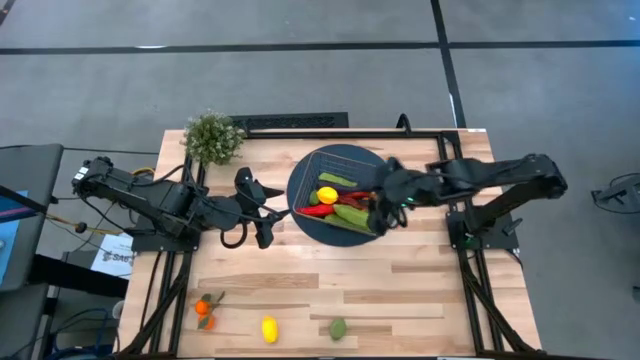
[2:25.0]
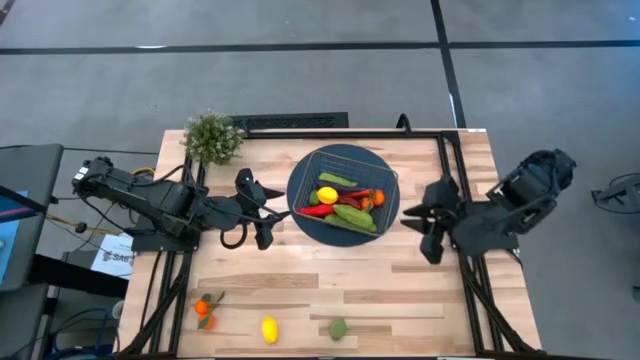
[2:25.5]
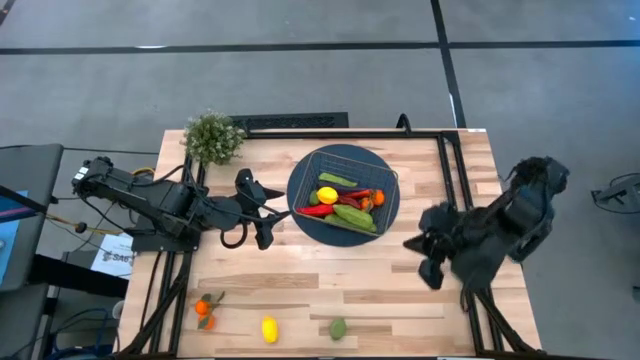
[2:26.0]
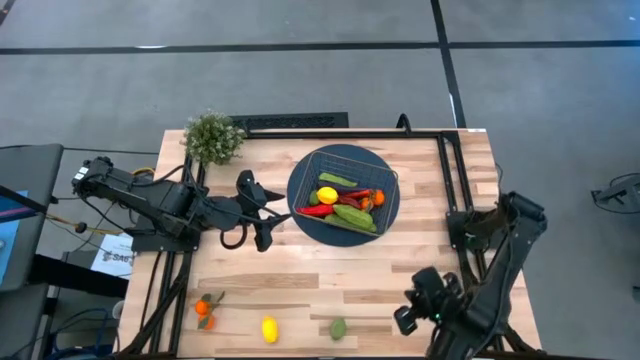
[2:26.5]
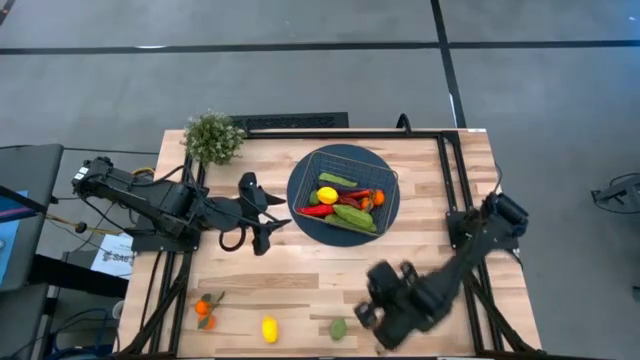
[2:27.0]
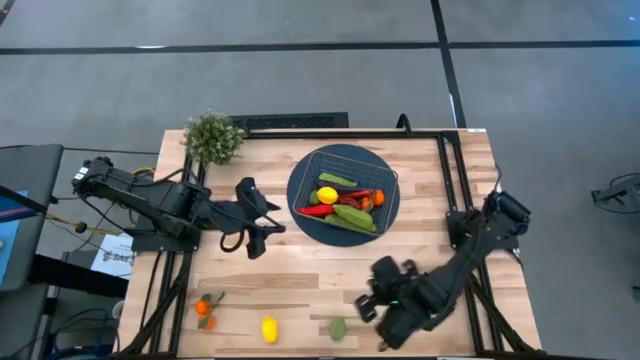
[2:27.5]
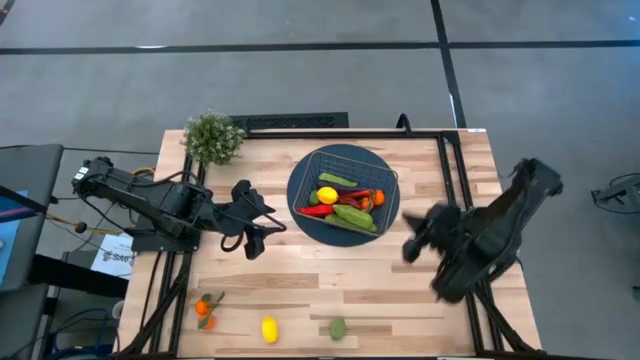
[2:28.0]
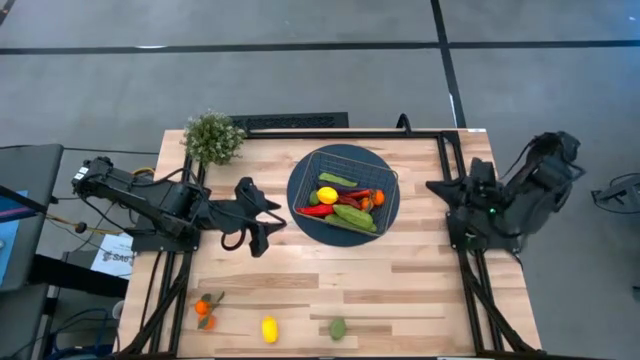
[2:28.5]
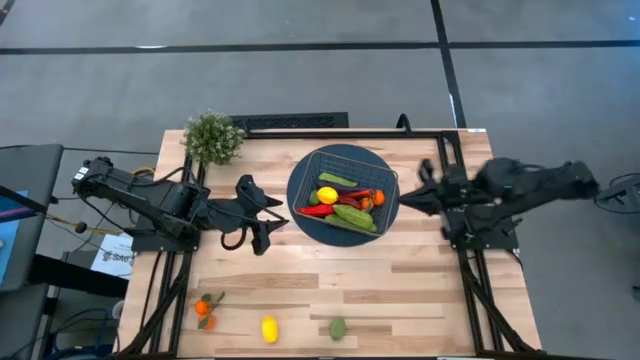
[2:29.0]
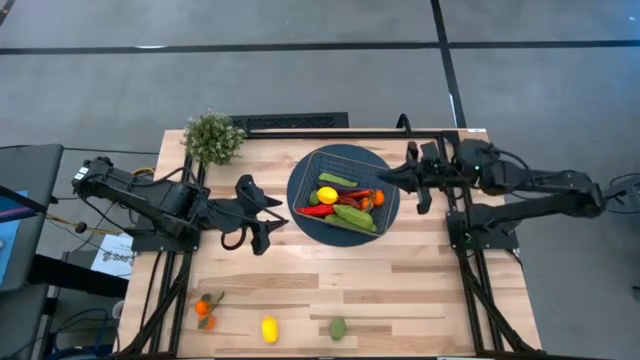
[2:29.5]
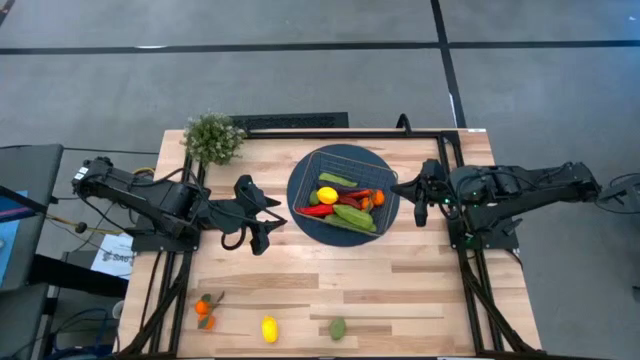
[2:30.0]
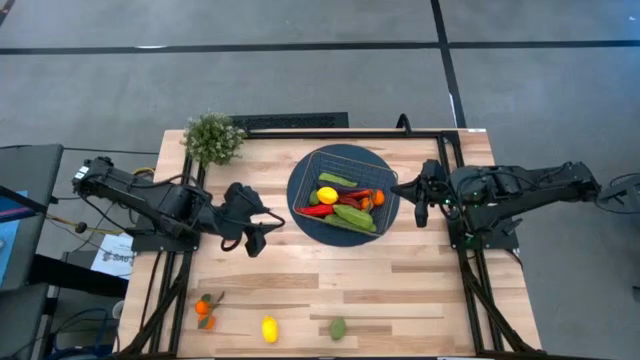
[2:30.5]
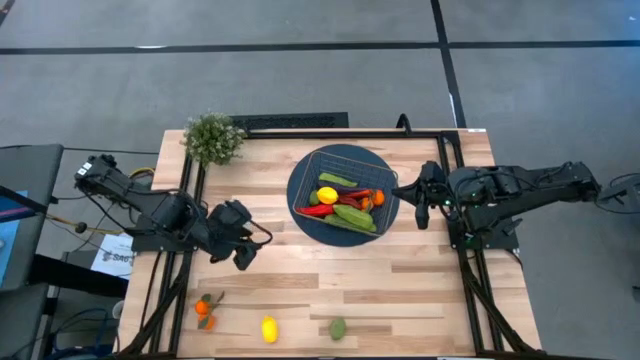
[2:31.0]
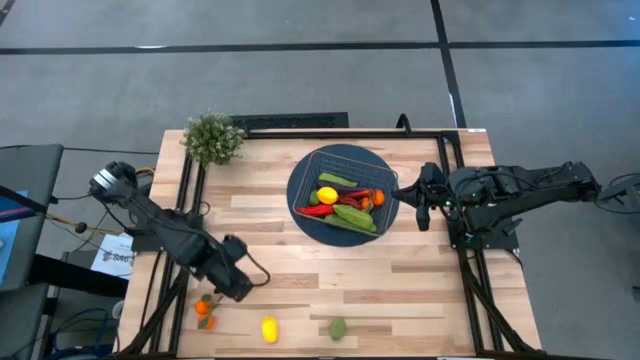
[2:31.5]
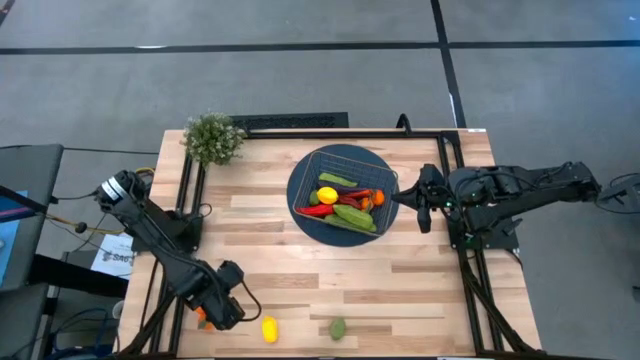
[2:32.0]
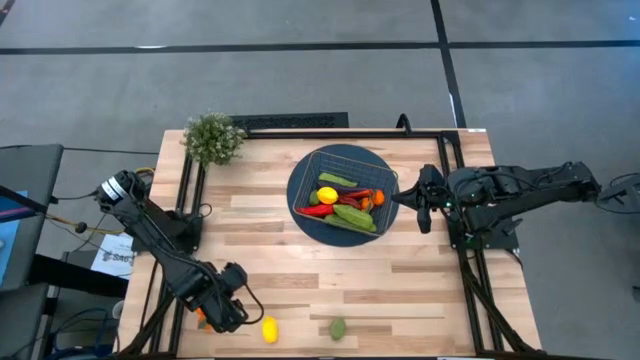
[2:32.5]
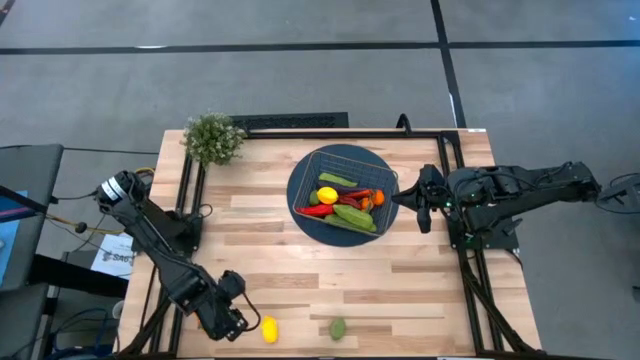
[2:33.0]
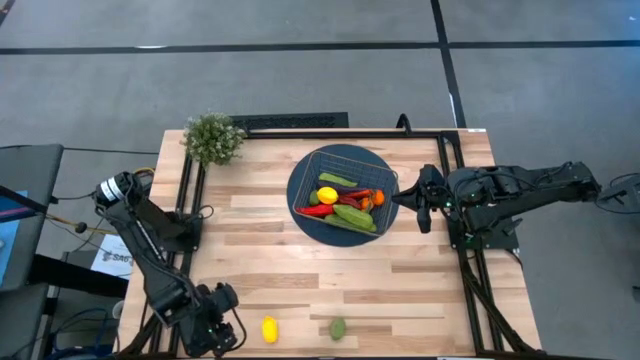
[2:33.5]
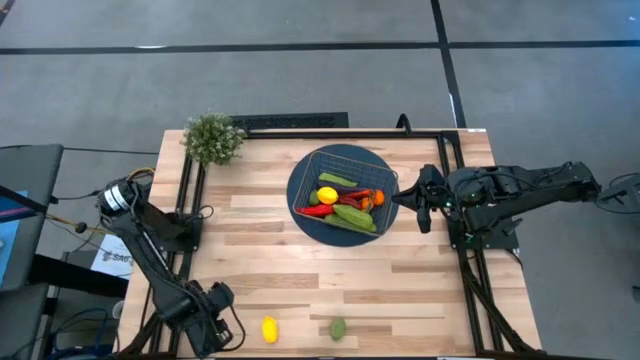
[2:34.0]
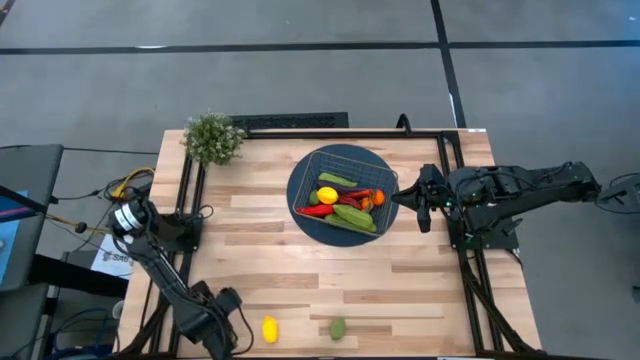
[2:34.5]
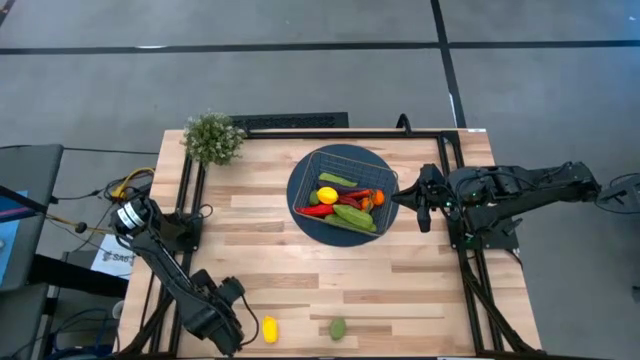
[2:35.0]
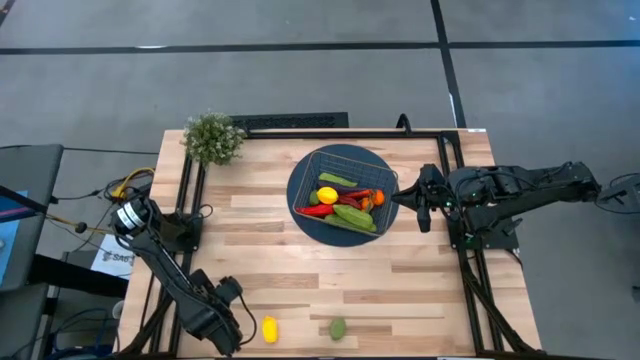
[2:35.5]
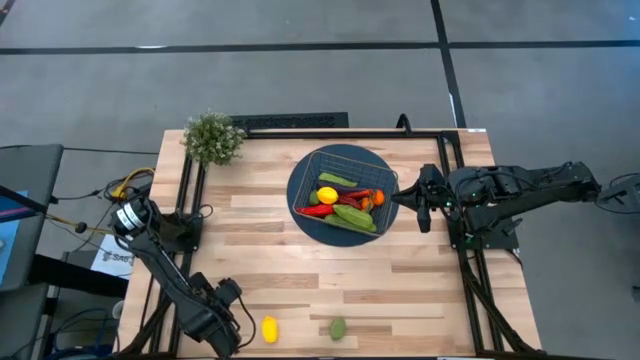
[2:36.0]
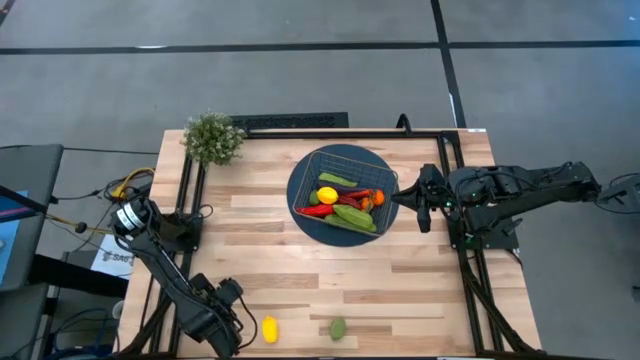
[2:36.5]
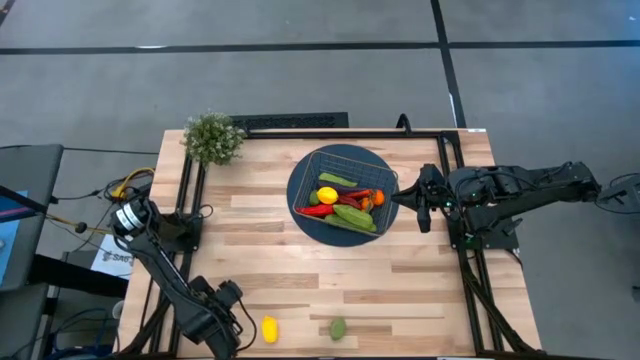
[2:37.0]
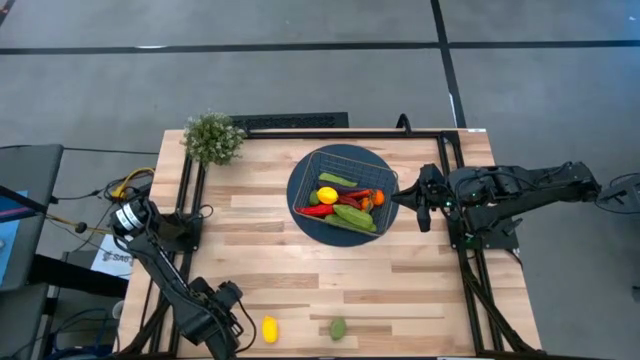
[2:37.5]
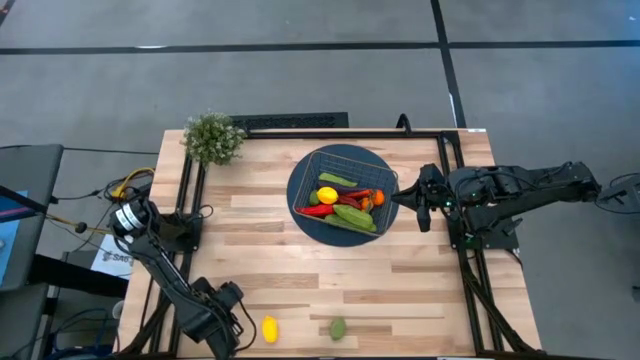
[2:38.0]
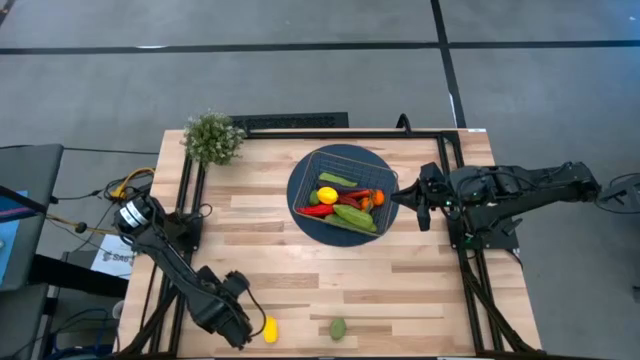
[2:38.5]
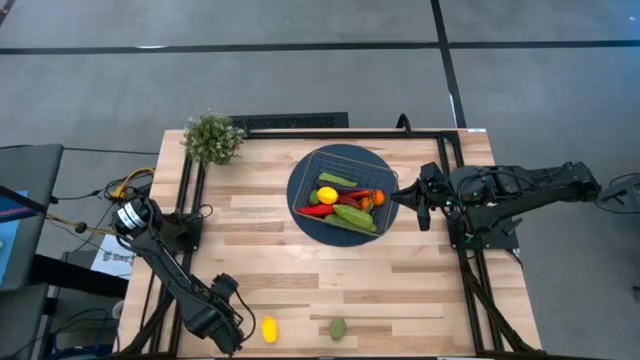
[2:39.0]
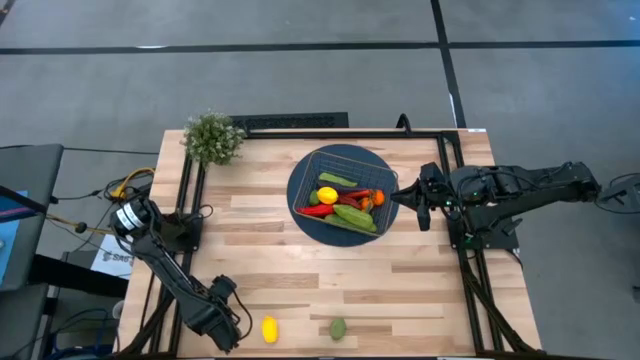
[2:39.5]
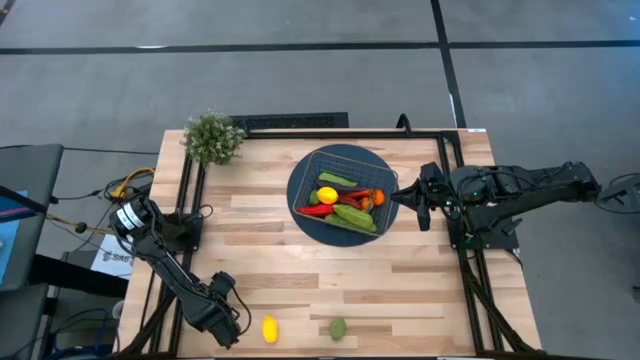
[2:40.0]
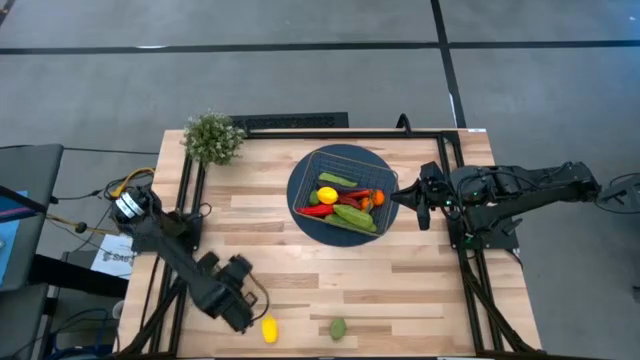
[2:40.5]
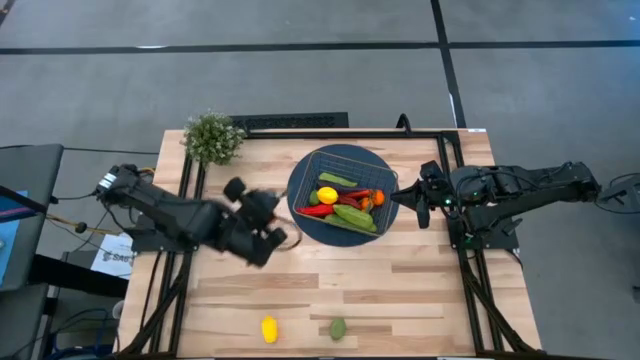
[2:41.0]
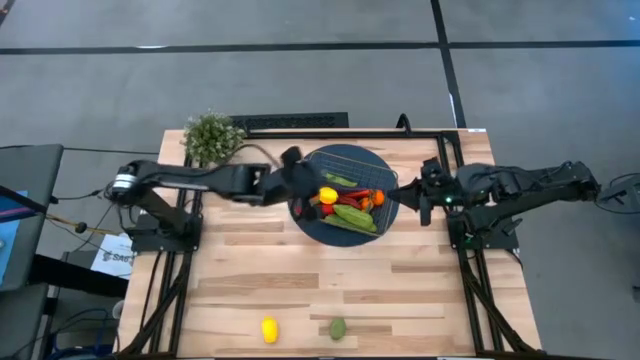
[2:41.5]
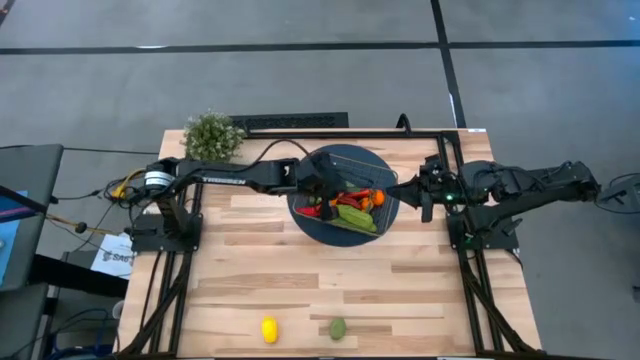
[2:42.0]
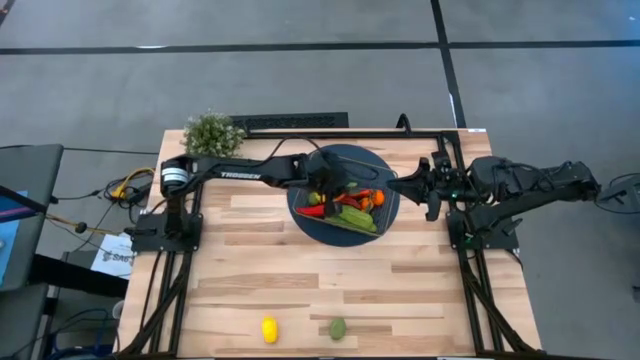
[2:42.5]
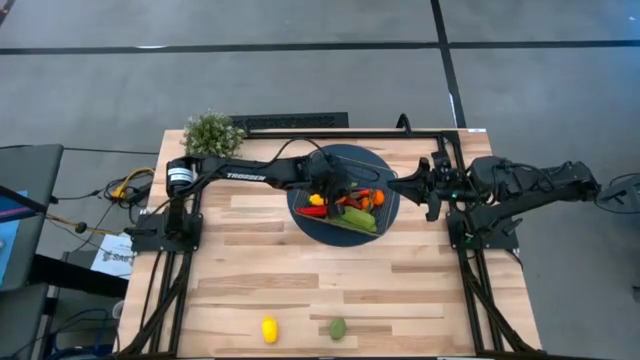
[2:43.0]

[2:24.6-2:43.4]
Task: Build produce basket
Put the orange tangerine into the wire basket

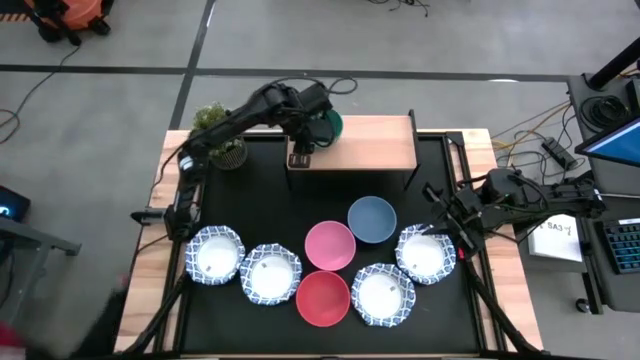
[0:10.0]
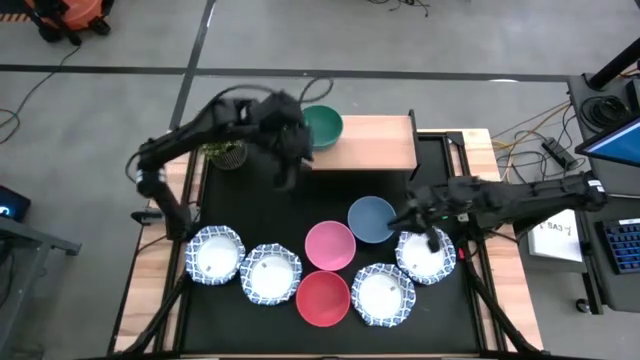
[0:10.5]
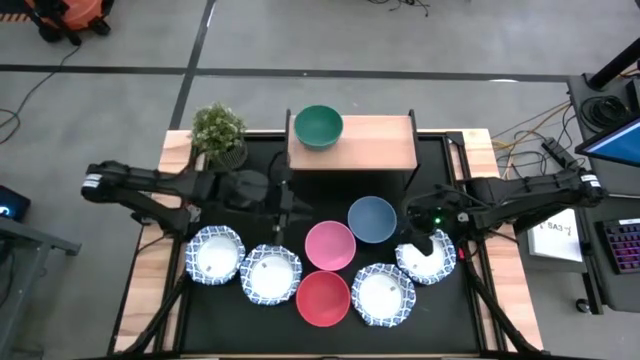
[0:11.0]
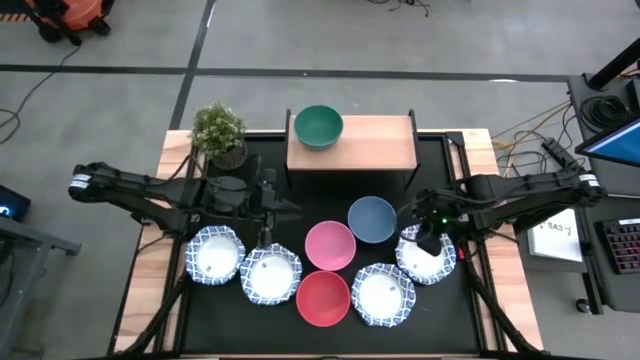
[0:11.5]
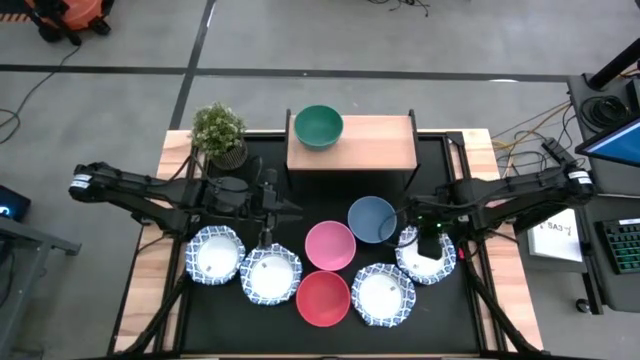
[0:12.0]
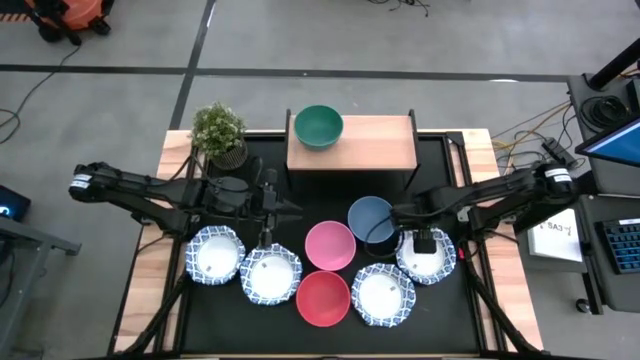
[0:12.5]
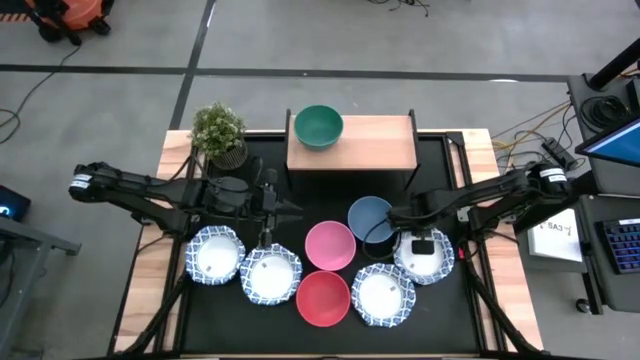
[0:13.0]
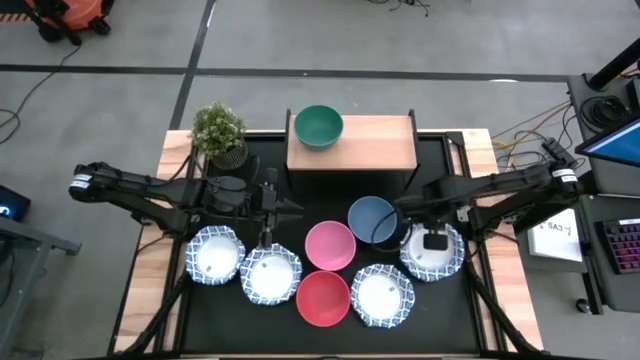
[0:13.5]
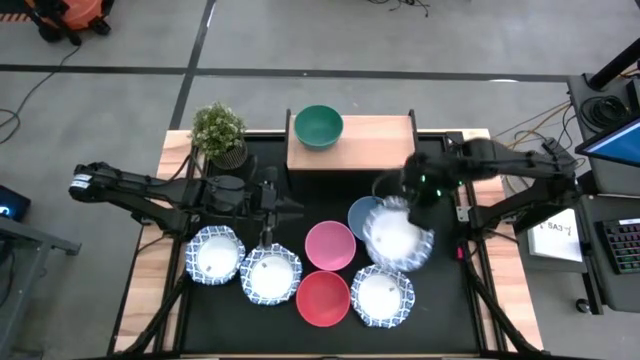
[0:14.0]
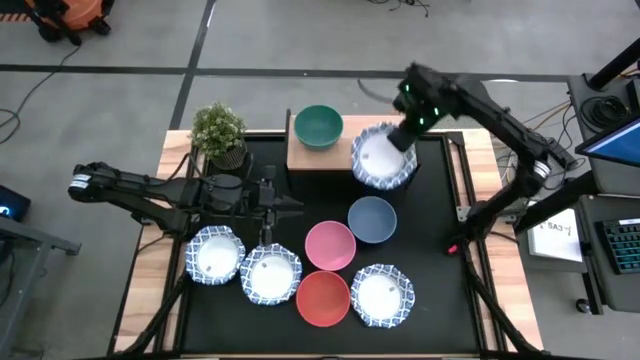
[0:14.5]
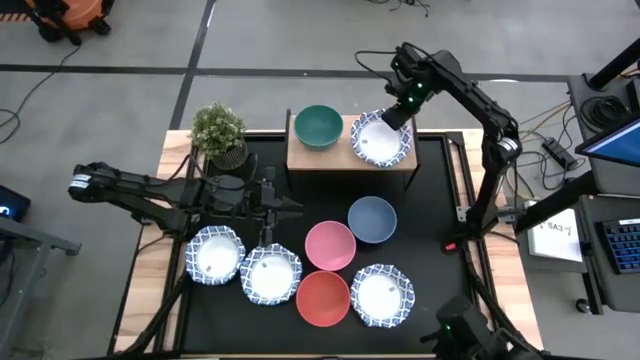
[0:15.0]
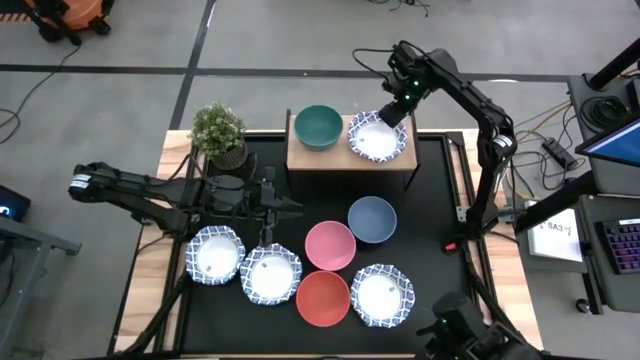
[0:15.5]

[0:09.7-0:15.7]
Task: Place and stack bowls onto a shelf
Put the right white and blue paper plate on the shelf
